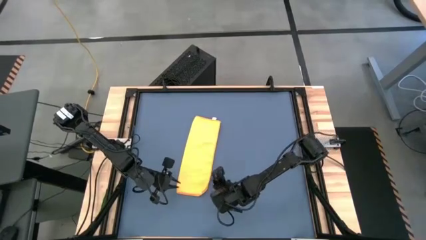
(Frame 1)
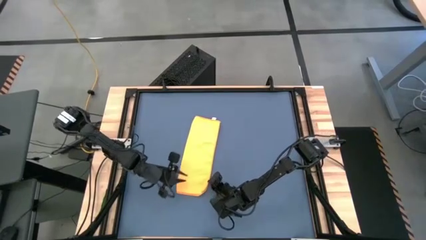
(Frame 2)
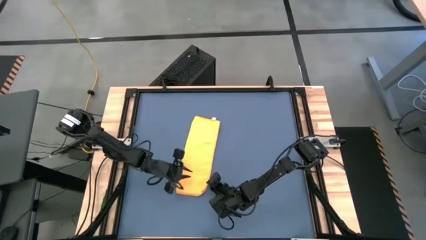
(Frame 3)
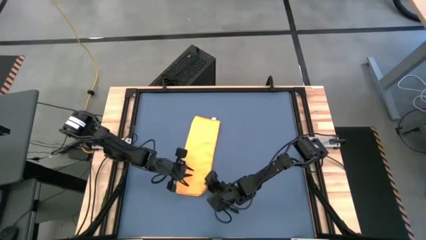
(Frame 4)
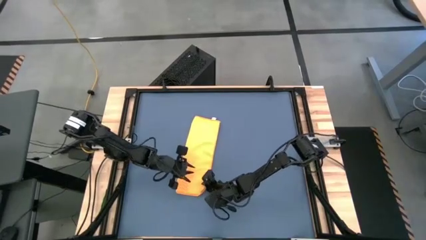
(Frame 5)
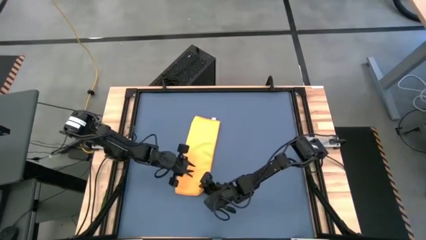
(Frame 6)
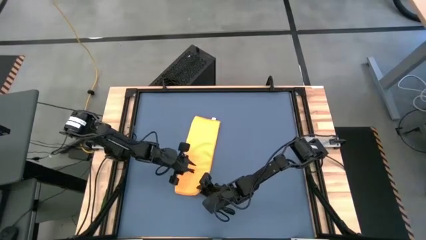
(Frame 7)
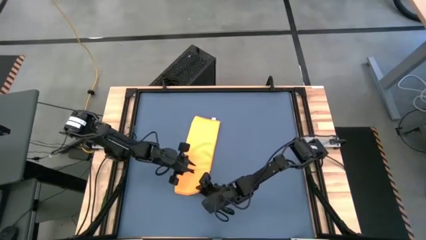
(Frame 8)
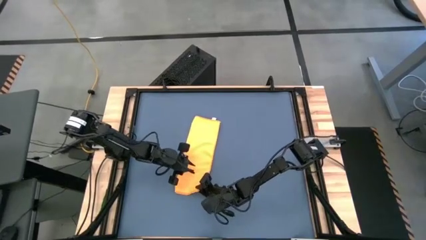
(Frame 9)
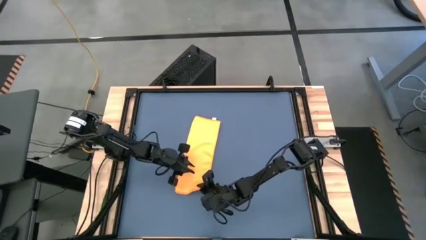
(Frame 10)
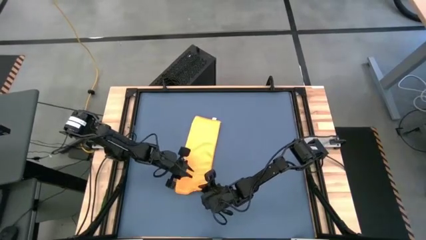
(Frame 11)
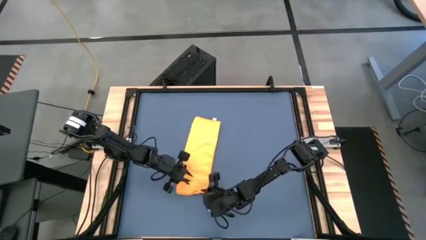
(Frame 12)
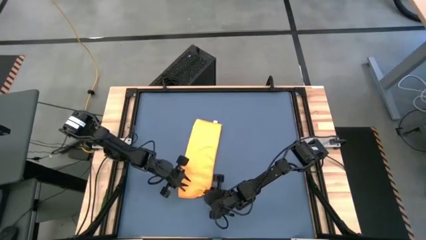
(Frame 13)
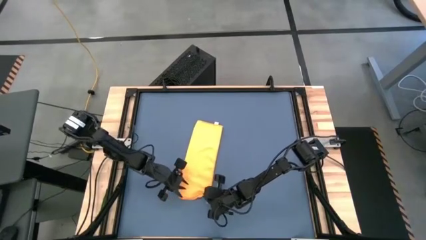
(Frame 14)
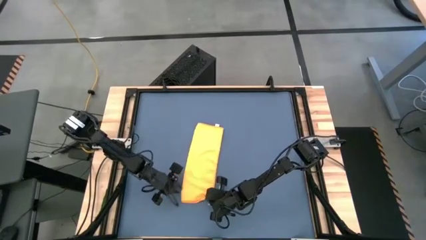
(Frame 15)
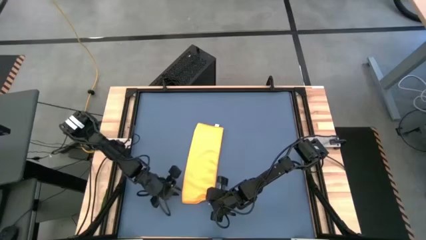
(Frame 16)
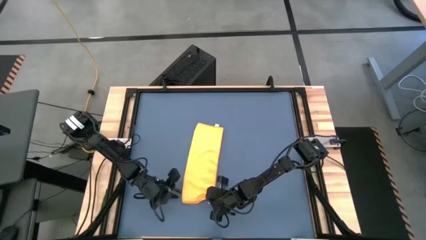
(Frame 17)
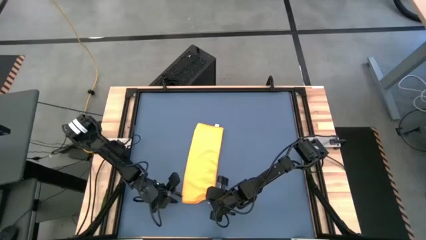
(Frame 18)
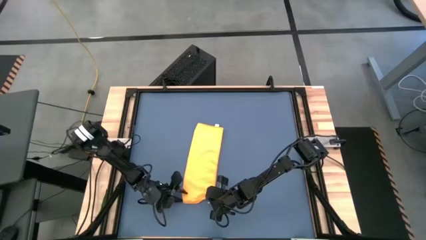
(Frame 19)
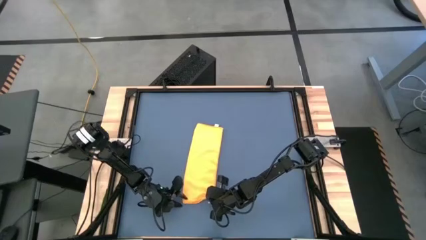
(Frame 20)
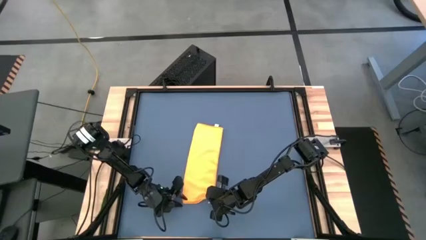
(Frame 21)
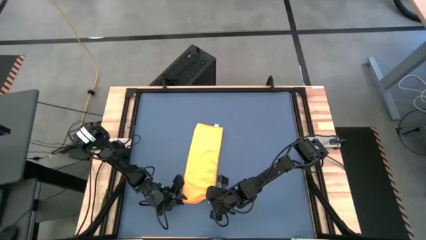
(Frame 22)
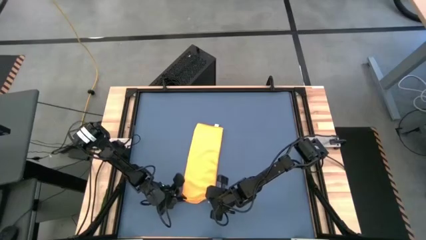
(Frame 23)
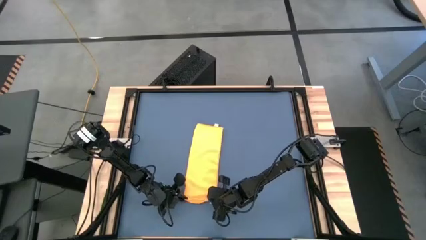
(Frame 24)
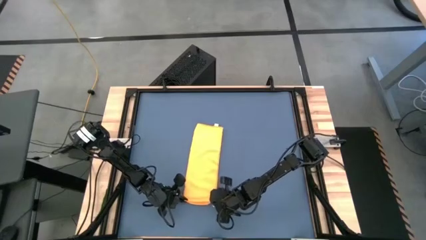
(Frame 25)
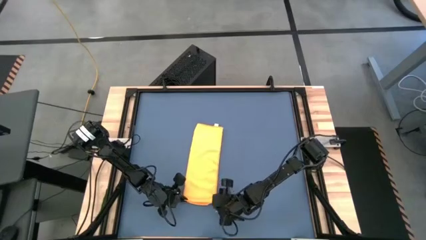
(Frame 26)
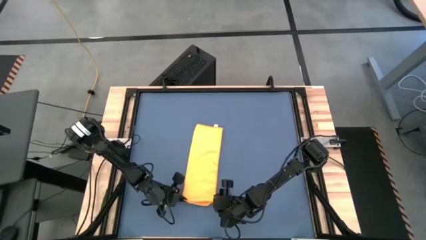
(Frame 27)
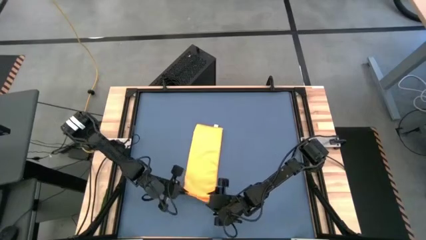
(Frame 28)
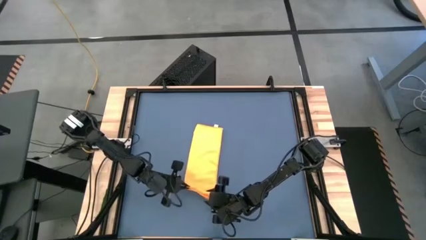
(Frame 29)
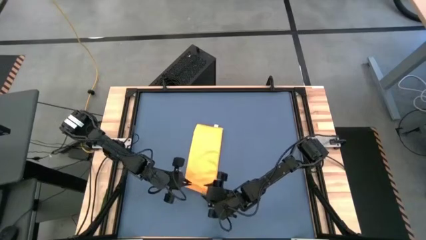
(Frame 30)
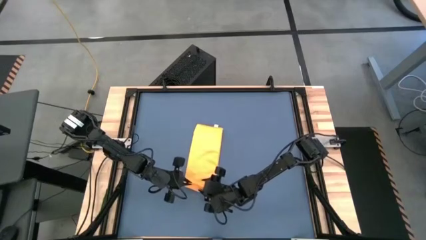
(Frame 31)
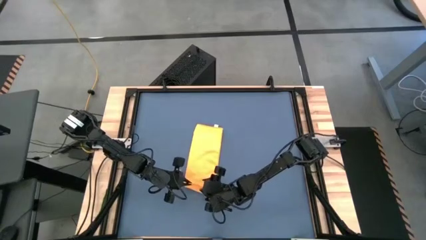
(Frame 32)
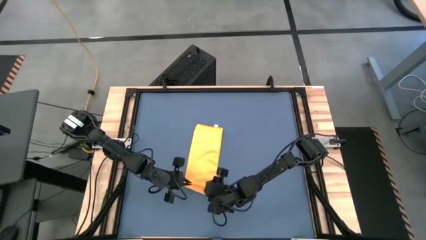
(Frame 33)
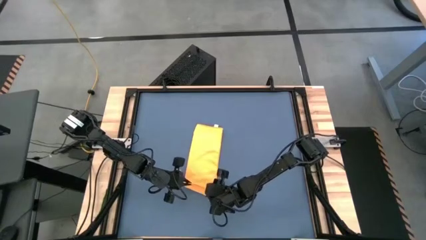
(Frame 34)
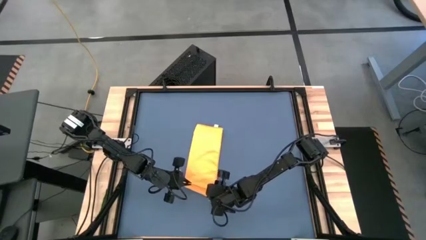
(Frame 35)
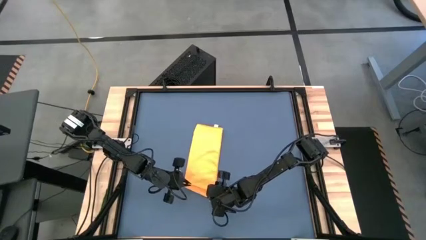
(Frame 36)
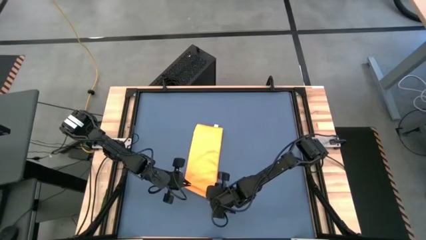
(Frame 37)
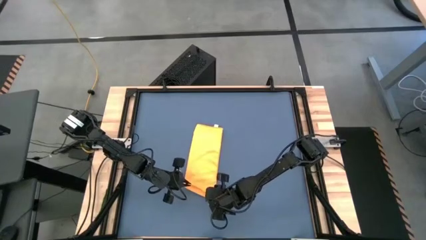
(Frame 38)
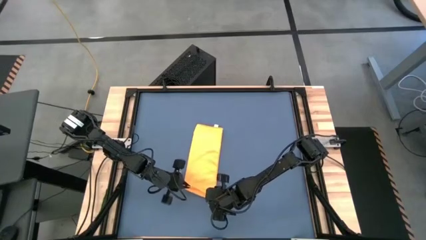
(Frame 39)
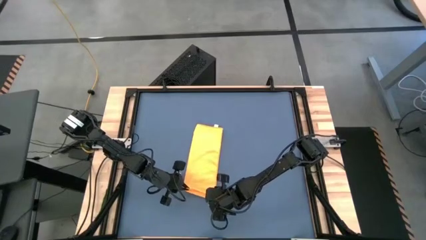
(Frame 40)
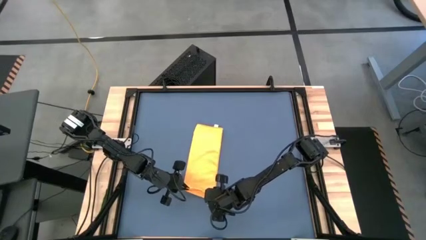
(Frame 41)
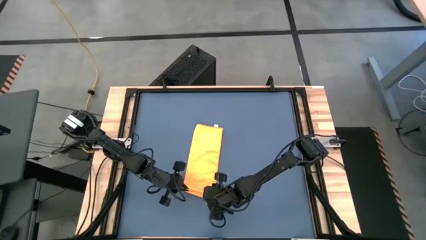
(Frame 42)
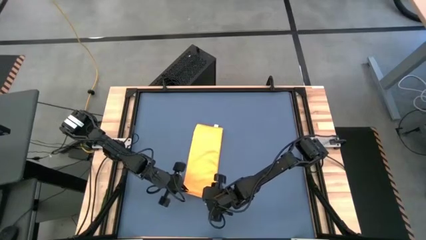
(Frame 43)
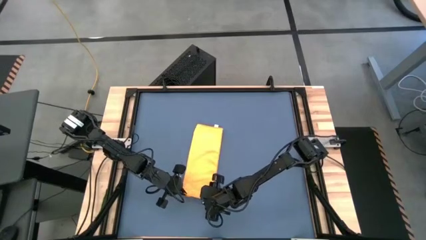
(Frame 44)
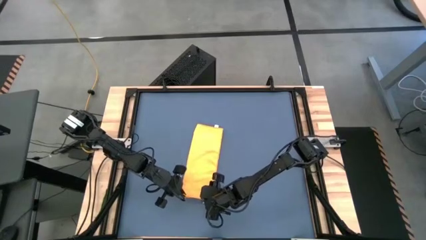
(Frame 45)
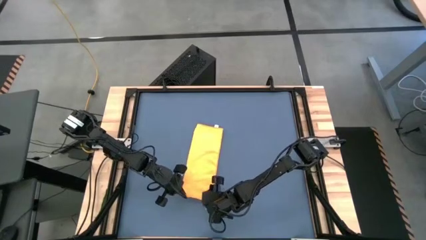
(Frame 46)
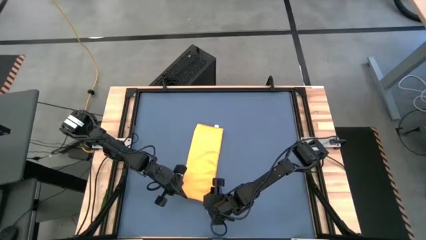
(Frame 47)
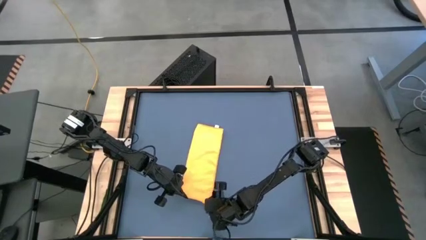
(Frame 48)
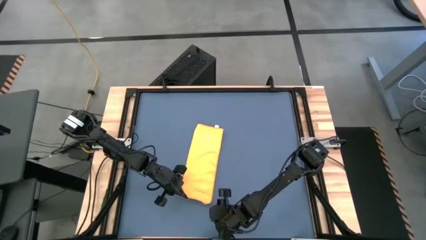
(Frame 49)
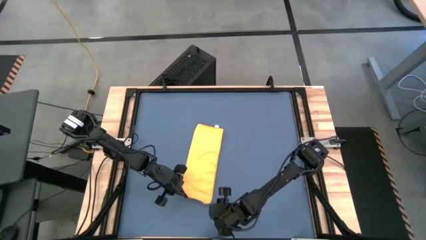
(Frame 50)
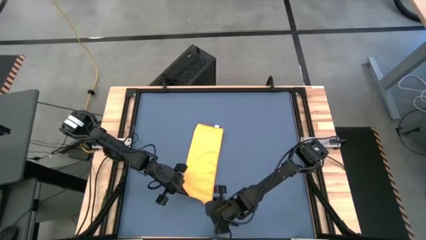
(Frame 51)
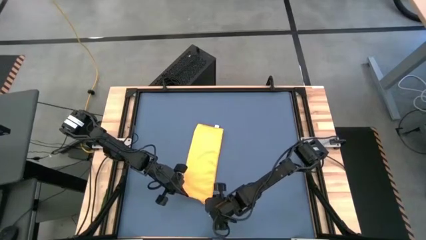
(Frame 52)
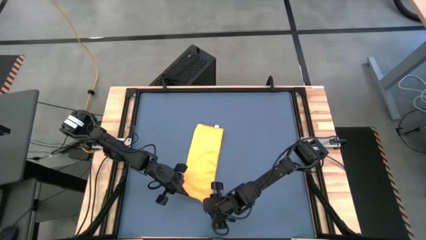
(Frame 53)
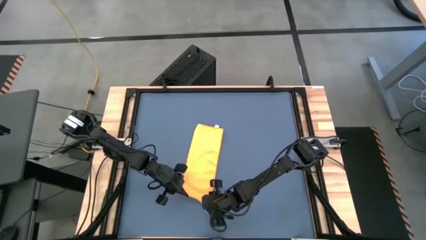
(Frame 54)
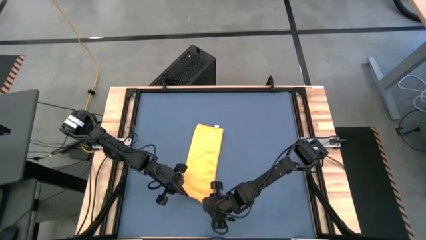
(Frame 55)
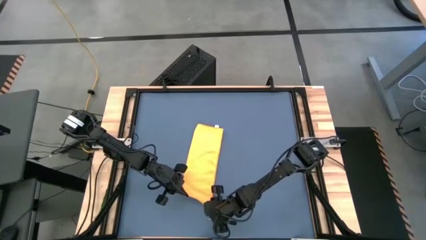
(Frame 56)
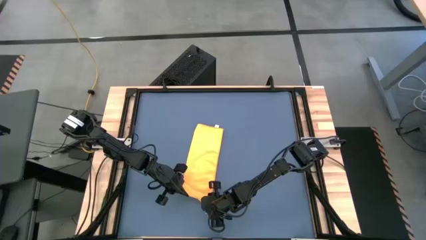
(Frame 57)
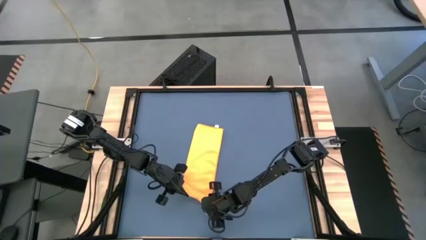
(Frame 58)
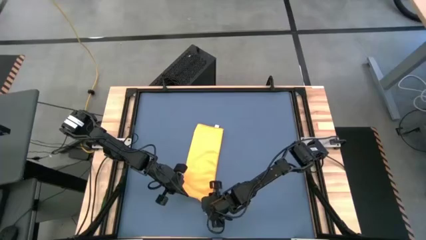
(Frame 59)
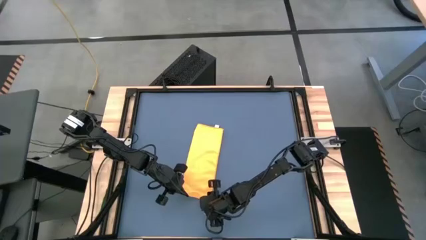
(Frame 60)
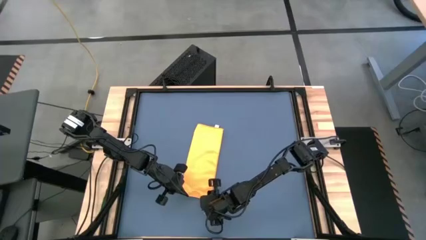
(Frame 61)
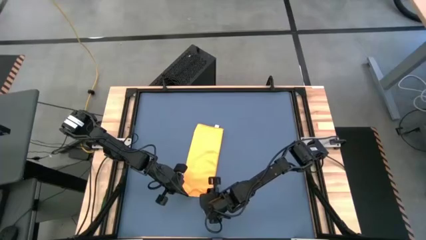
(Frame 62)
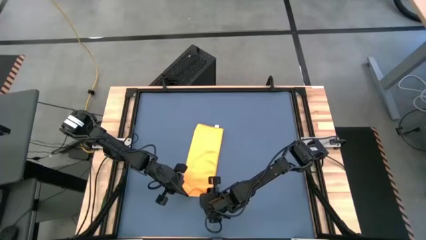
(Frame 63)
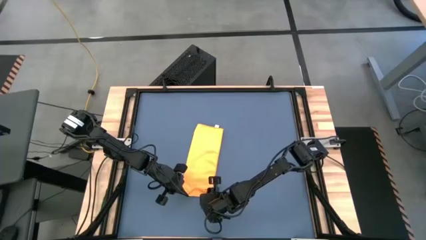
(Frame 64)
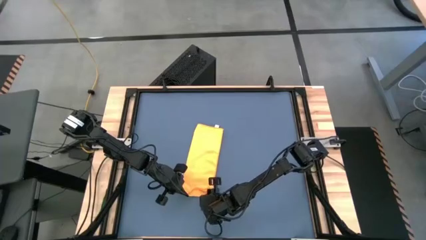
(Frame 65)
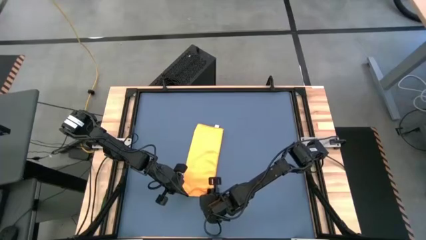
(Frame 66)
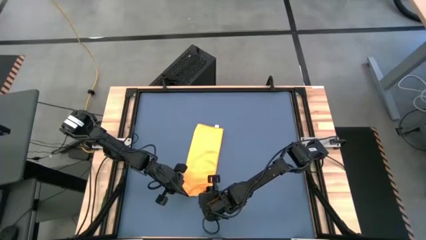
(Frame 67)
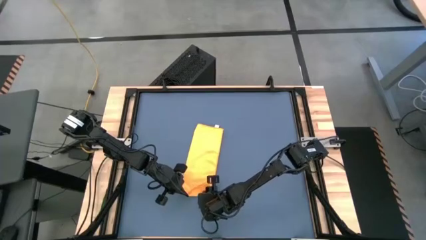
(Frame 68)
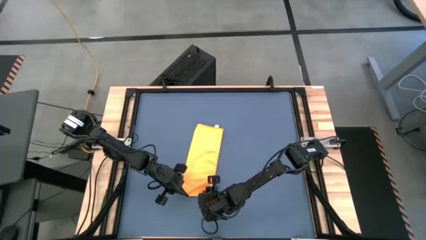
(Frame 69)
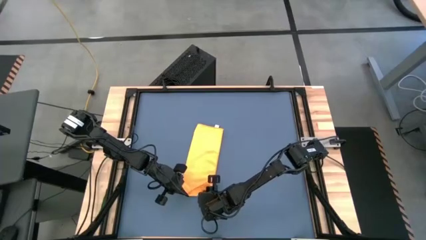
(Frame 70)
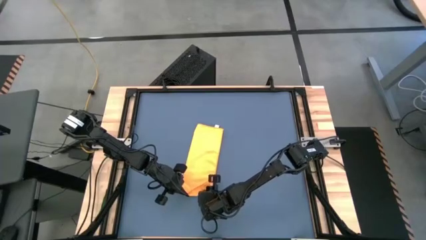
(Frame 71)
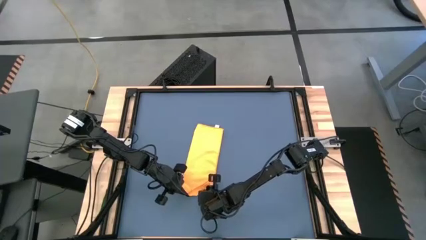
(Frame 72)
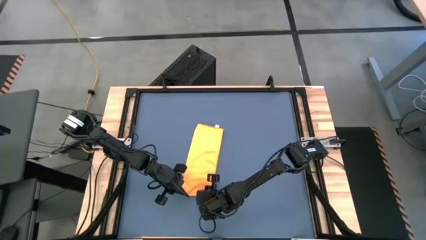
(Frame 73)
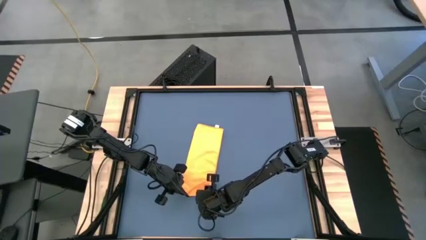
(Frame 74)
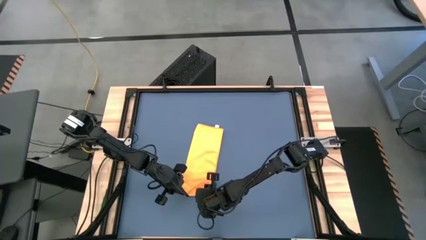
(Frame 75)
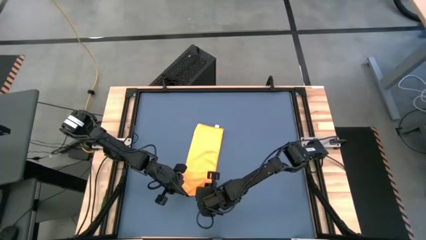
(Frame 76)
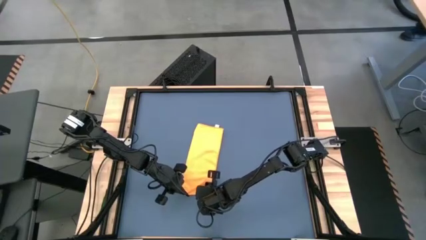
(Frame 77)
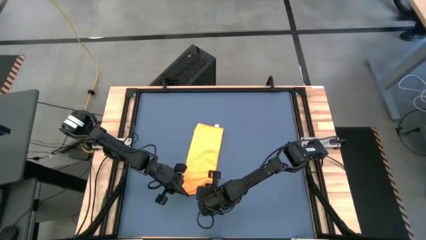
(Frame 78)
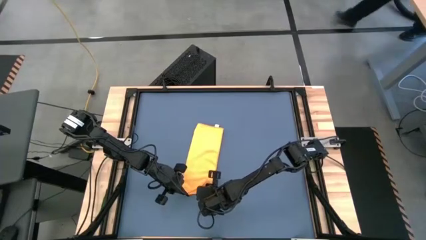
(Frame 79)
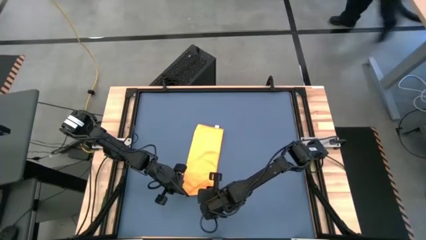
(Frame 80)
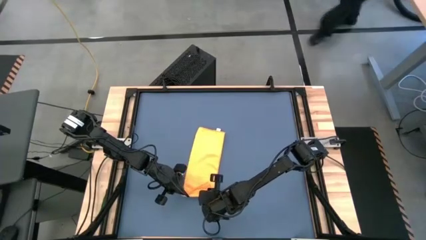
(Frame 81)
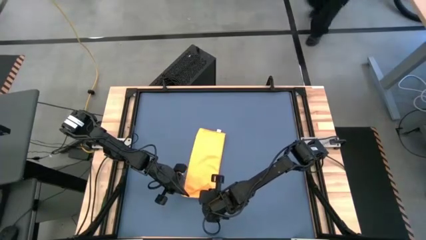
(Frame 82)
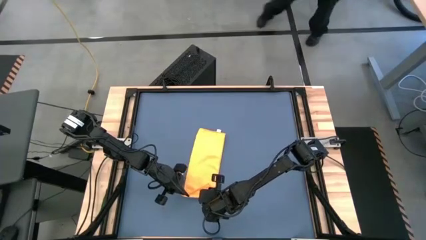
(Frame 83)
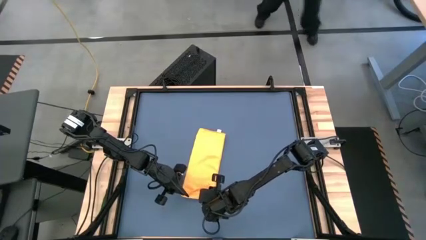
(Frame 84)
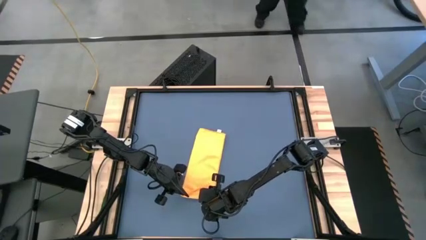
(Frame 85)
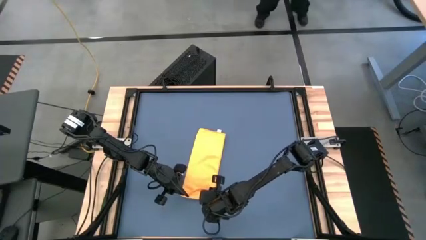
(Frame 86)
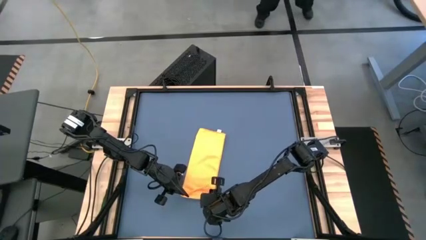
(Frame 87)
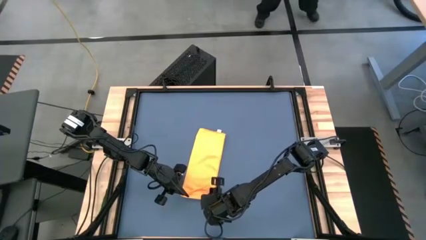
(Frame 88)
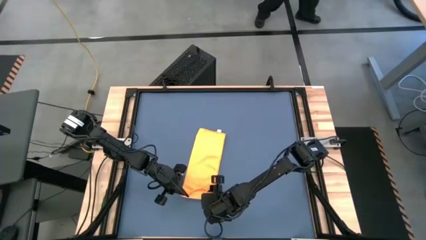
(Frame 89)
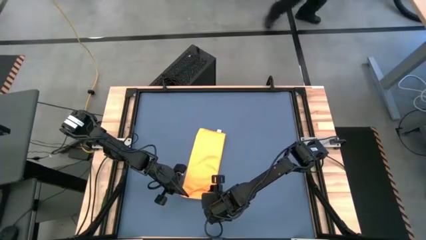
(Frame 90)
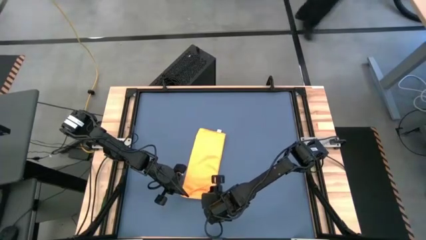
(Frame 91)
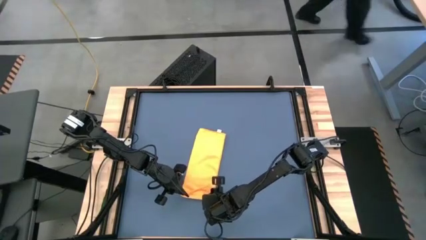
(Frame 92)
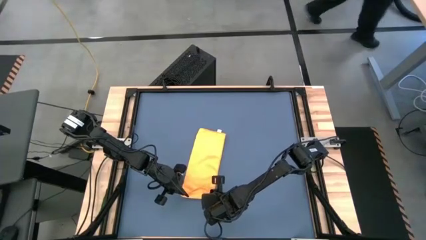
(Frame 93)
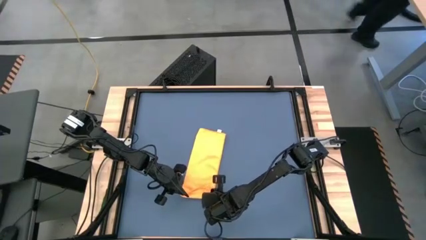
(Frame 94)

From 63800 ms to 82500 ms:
Task: Roll towel
Roll the yellow microfiber cloth
